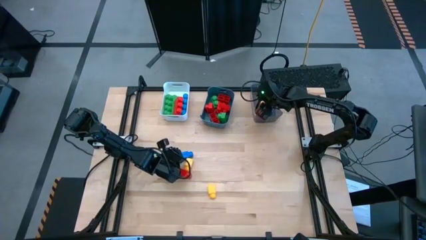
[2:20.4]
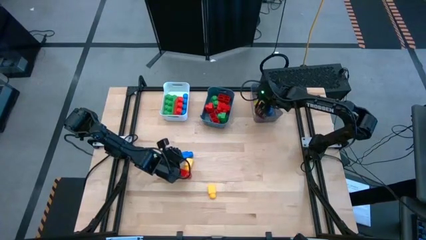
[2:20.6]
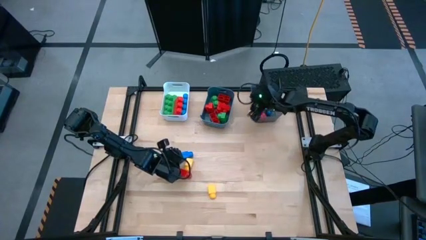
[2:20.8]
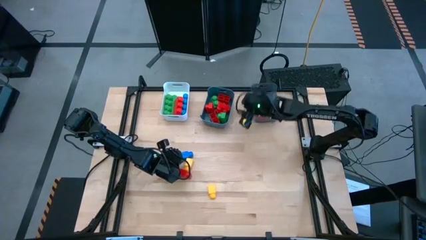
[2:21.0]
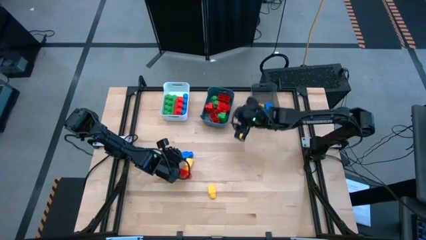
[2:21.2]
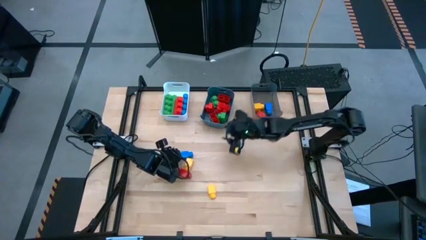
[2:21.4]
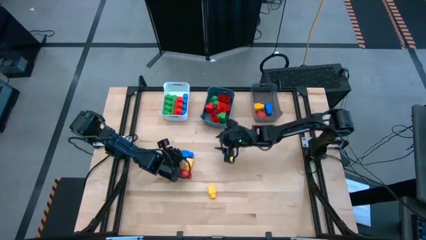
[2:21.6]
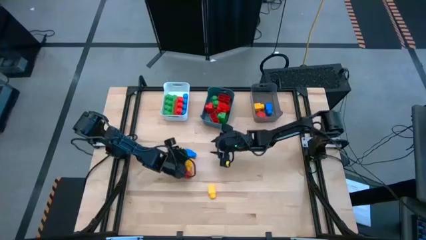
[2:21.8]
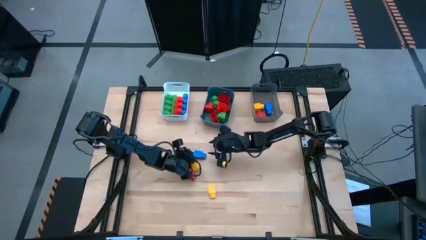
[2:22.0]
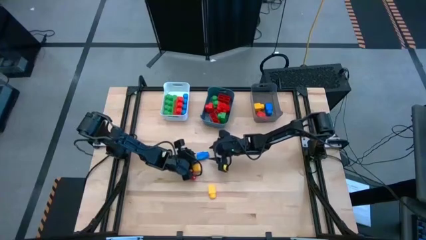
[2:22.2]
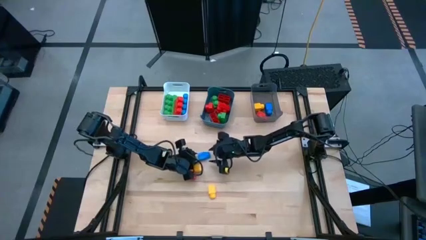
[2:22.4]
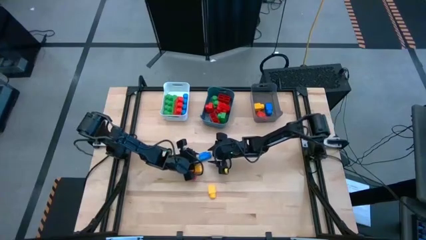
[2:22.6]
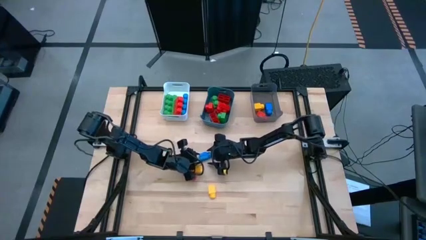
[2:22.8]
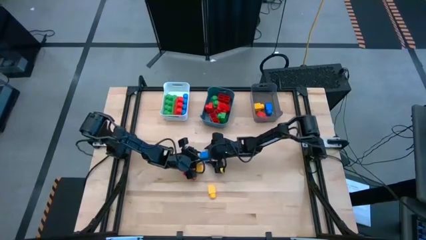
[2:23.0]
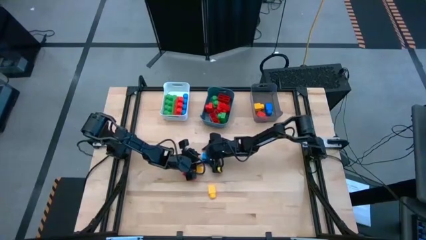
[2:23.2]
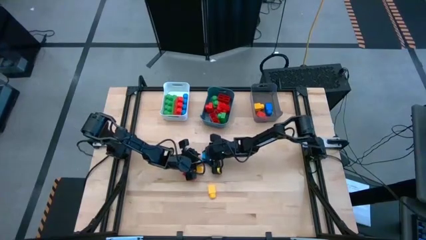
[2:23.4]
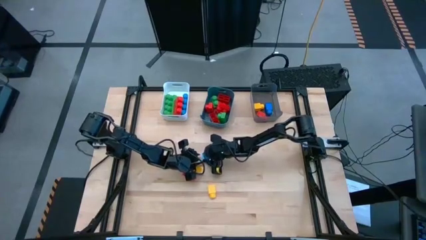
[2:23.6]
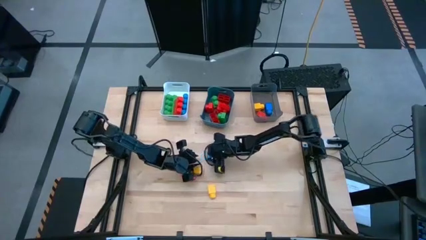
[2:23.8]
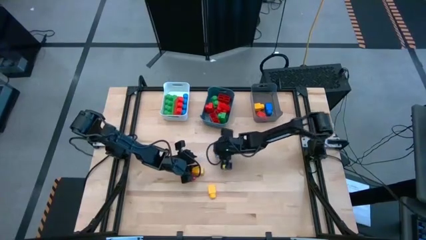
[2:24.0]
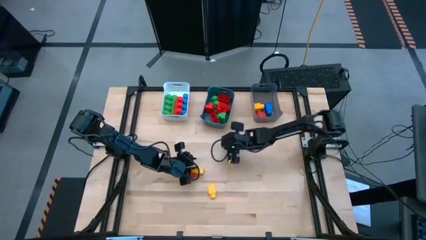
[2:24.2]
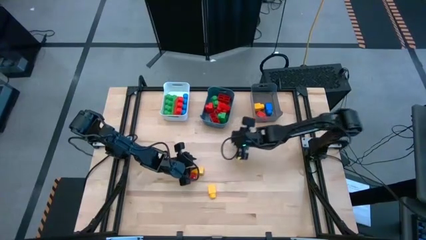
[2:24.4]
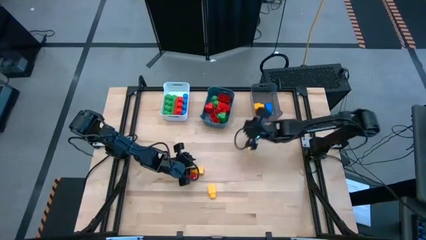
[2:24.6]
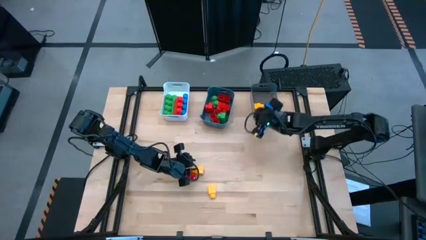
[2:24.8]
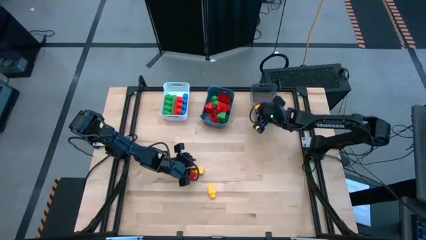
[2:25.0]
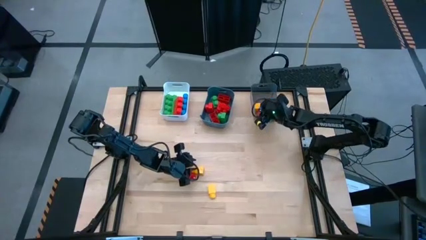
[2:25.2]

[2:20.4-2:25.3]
Task: Sort blocks by size
Put the 1 stud blue game piece into the black bin

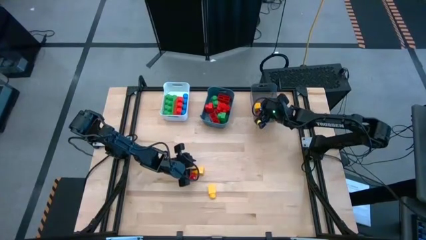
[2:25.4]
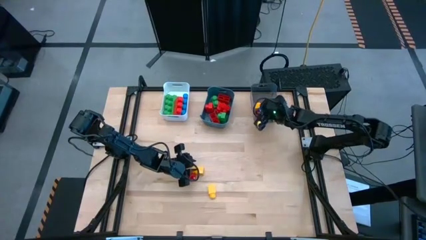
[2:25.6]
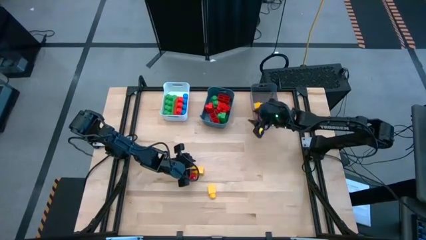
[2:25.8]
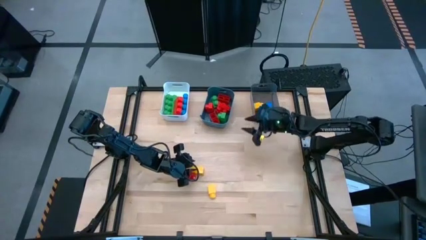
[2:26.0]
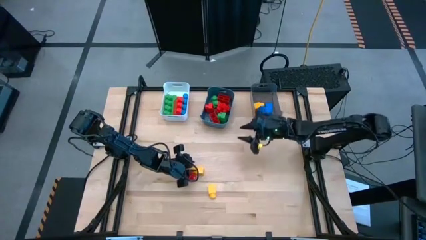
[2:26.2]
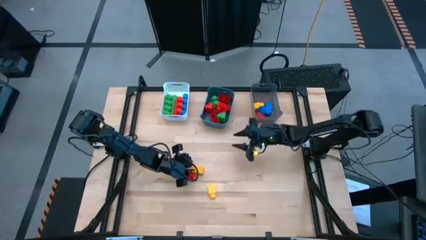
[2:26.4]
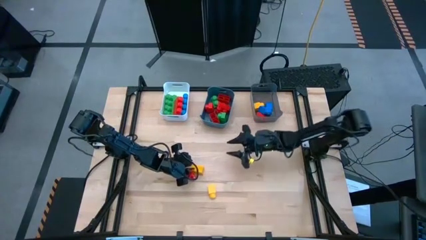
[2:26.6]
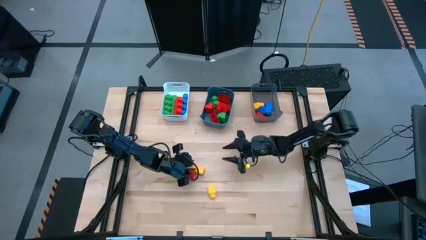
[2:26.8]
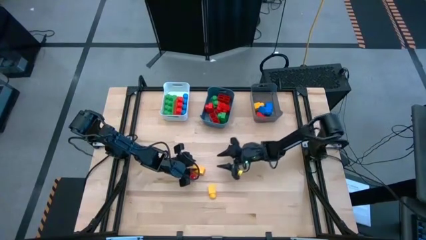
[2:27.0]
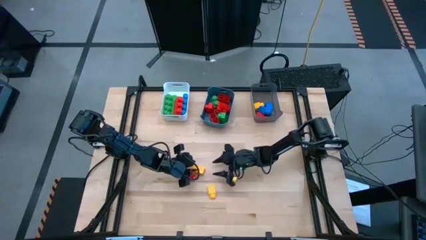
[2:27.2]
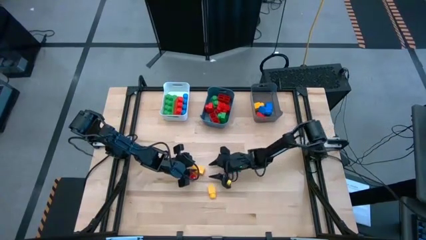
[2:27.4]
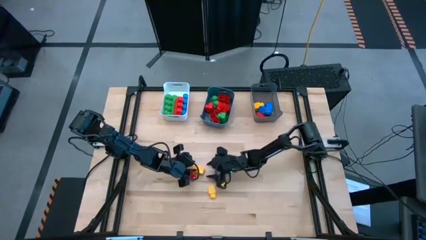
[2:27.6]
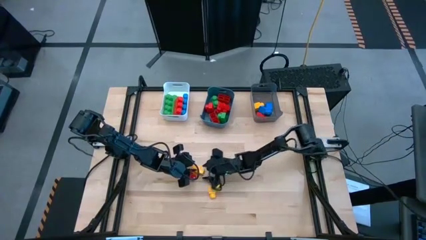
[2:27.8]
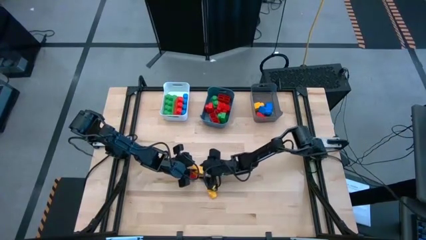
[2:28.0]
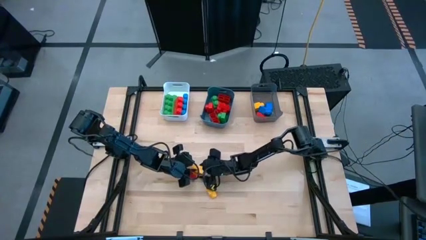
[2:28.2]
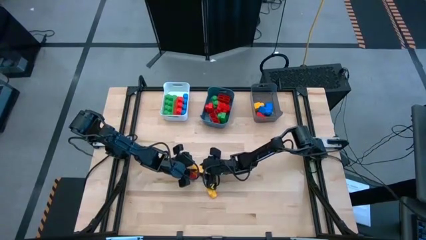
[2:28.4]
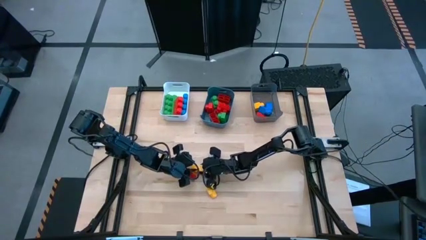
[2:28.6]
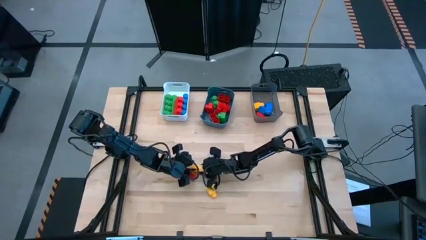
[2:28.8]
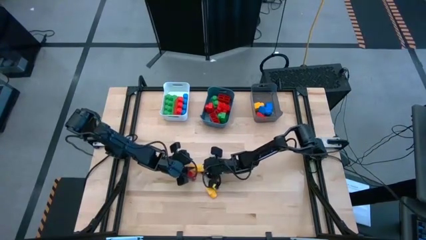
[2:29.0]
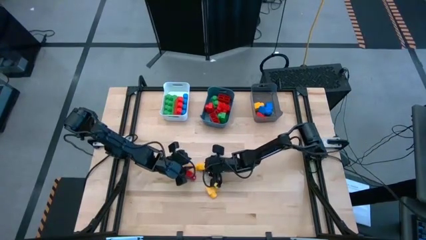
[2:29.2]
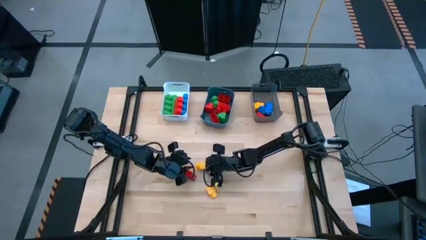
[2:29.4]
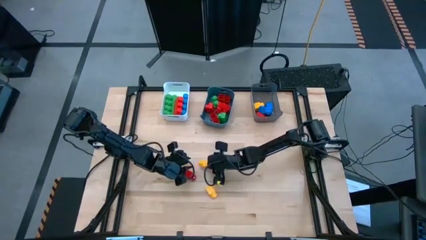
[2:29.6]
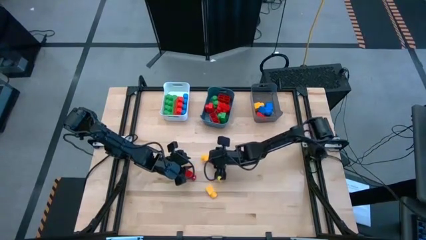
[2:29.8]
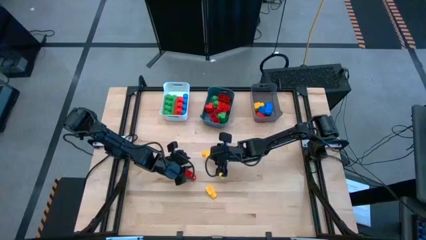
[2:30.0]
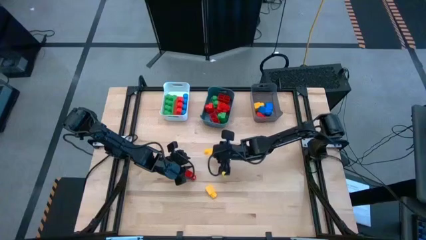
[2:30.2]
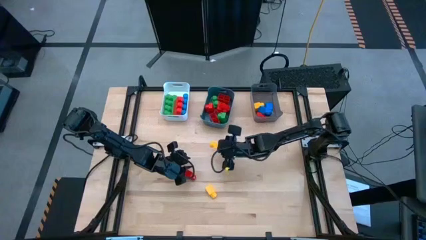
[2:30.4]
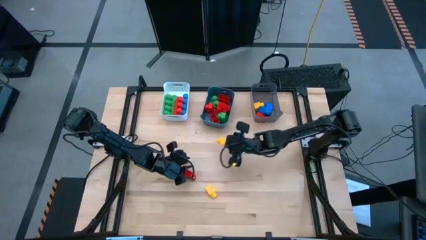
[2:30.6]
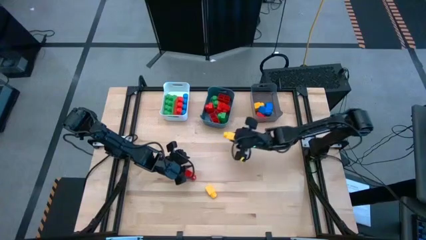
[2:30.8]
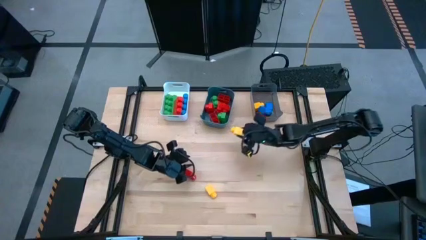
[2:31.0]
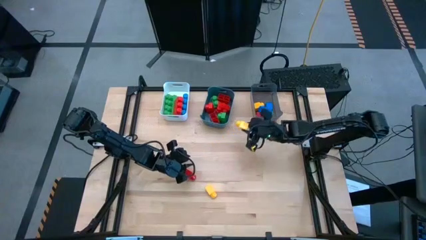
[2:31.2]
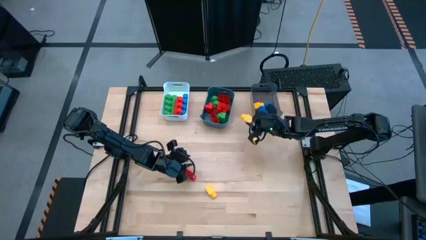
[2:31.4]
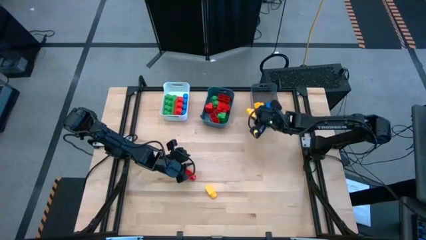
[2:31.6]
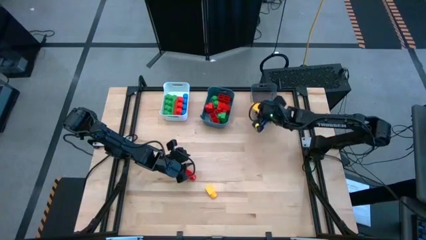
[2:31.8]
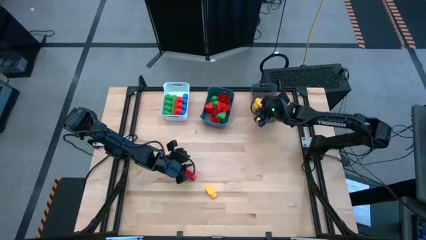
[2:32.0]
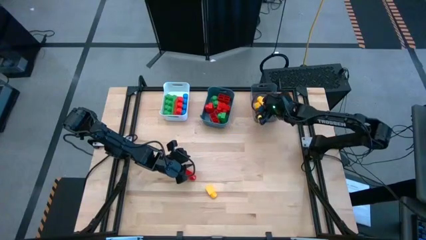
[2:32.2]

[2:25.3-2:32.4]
Put the 1 stud yellow game piece into the black bin

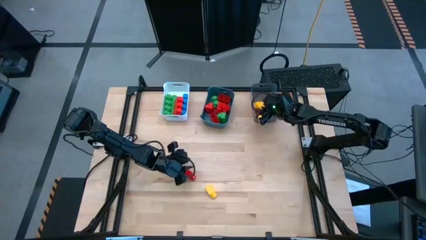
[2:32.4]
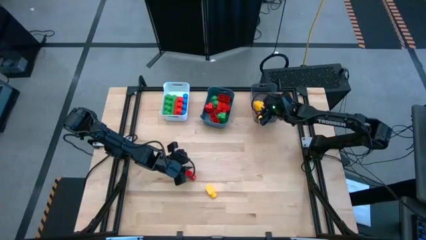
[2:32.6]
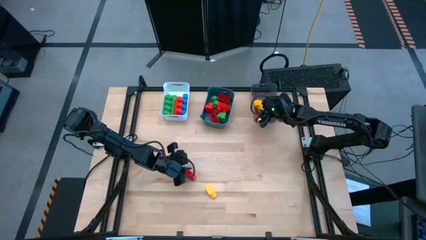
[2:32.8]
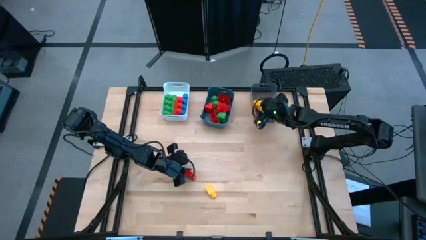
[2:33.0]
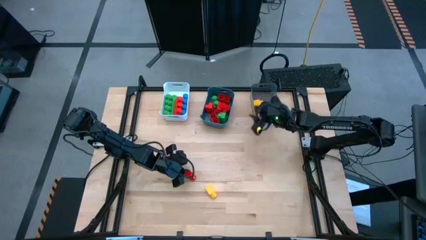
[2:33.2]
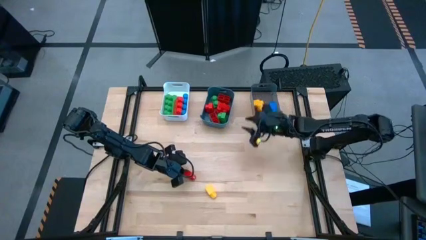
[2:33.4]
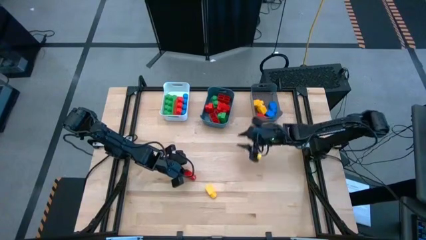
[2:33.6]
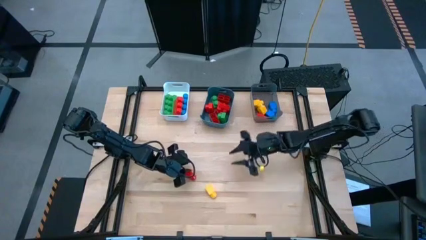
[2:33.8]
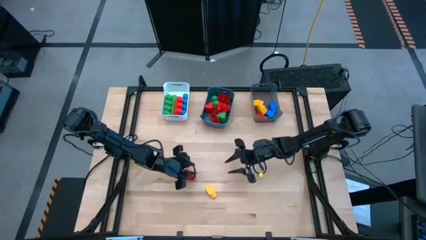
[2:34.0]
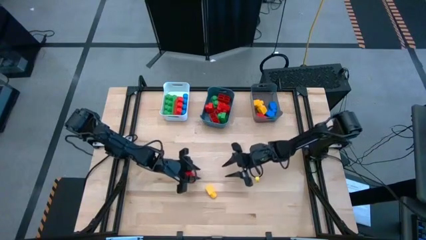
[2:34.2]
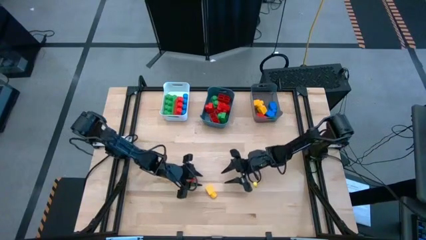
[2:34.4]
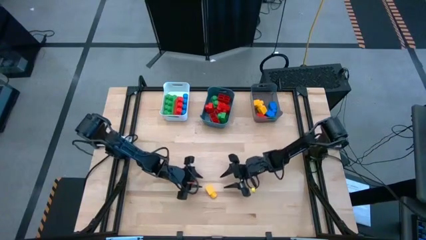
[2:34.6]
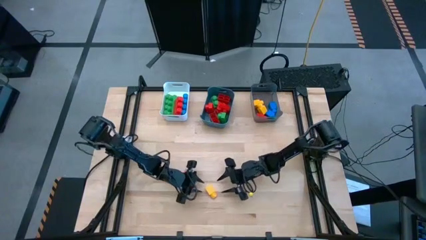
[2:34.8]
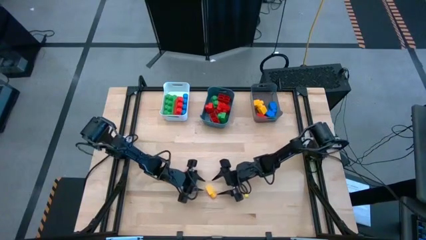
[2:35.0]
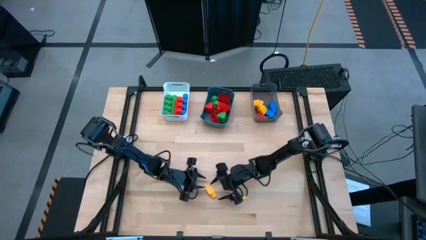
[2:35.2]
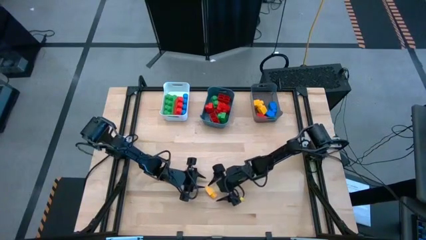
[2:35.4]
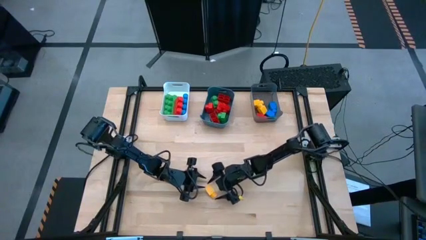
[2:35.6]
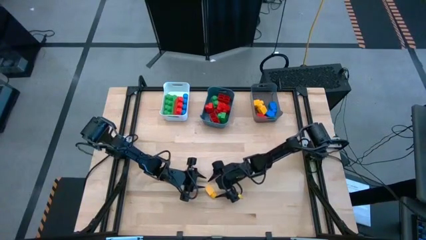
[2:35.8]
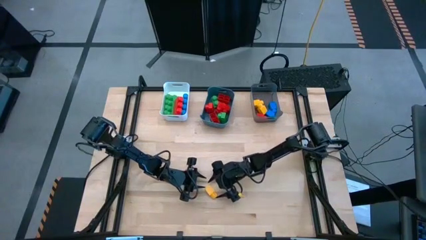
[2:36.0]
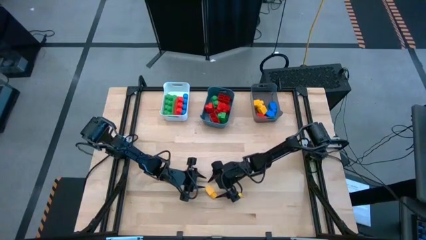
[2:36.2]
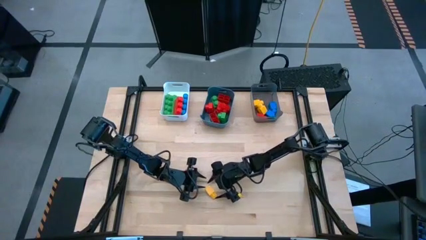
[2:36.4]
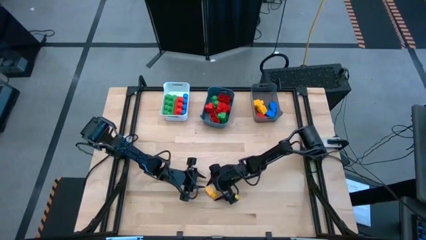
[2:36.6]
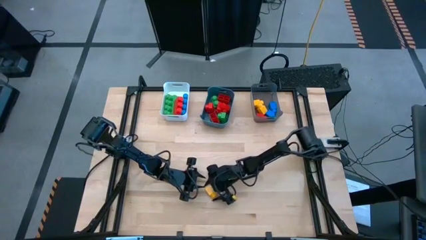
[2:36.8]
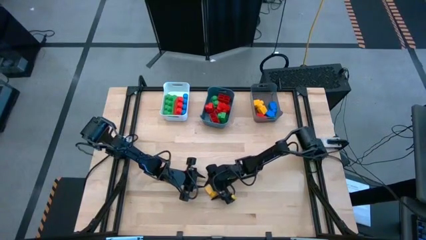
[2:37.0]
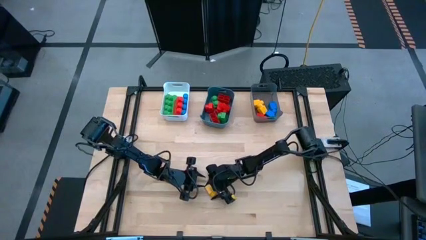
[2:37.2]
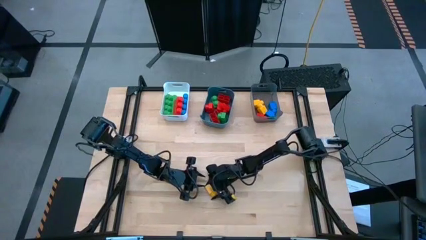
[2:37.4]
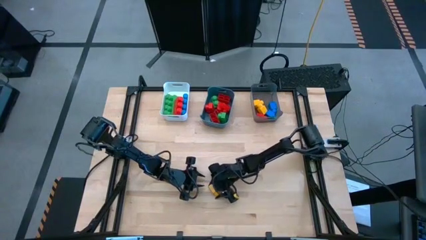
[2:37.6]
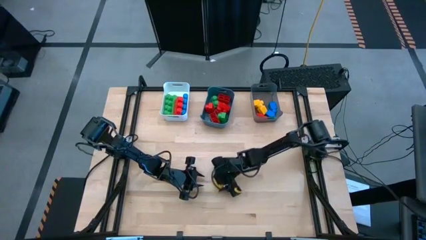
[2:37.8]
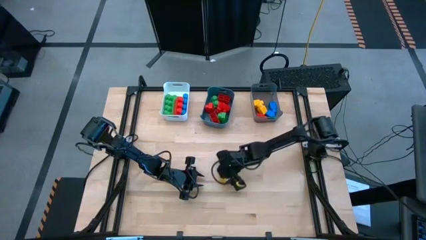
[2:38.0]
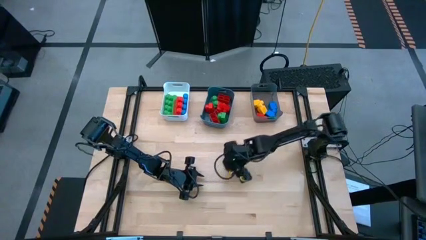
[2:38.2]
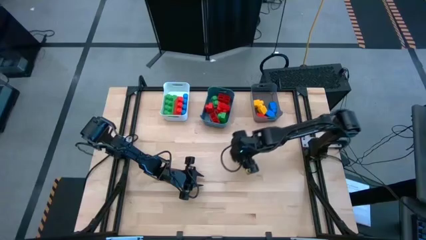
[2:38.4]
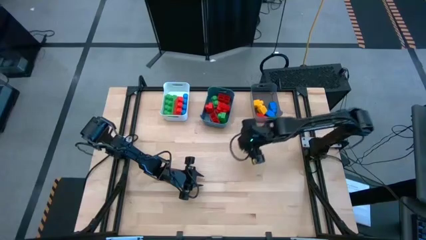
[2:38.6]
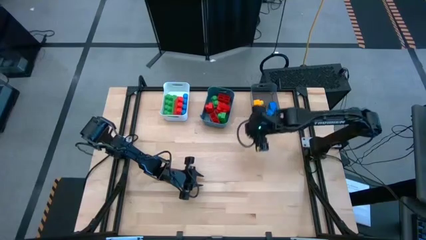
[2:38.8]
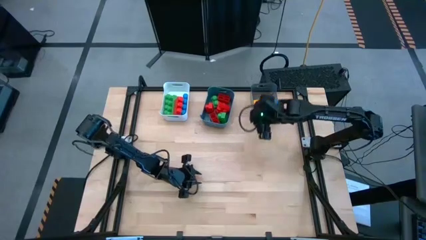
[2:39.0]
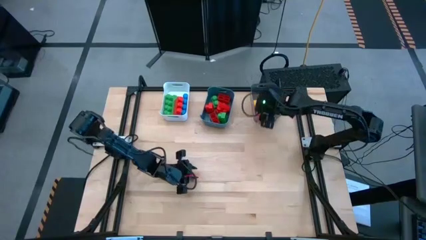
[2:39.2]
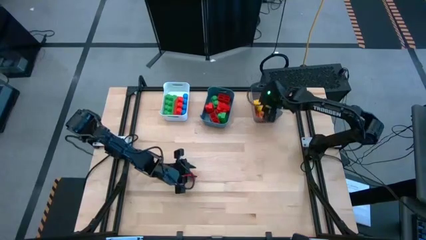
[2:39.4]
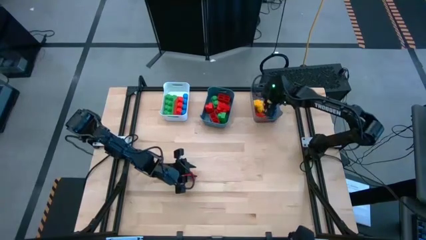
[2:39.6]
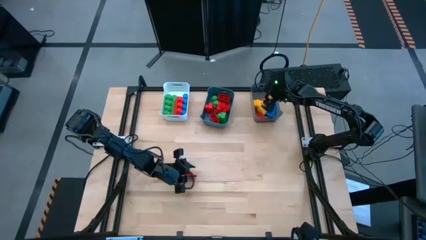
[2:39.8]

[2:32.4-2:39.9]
Put the 1 stud yellow game piece into the black bin
